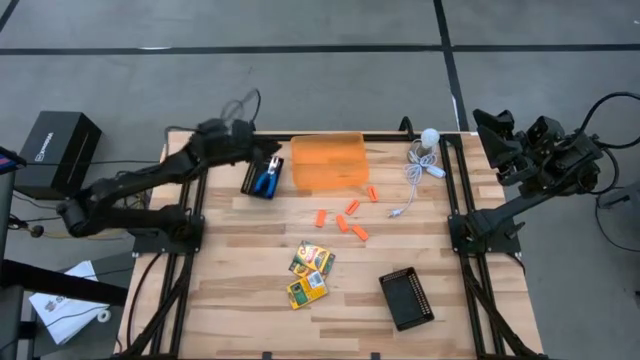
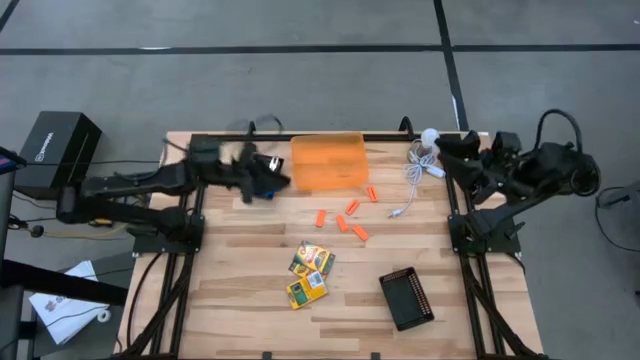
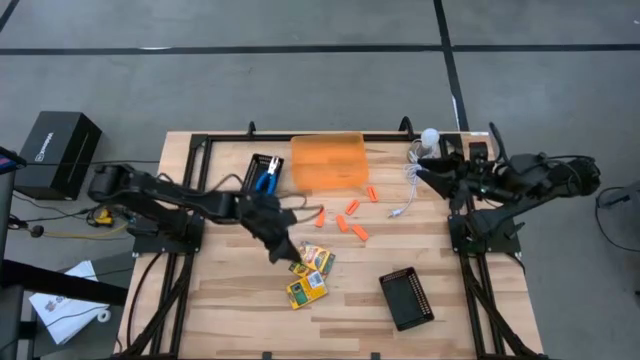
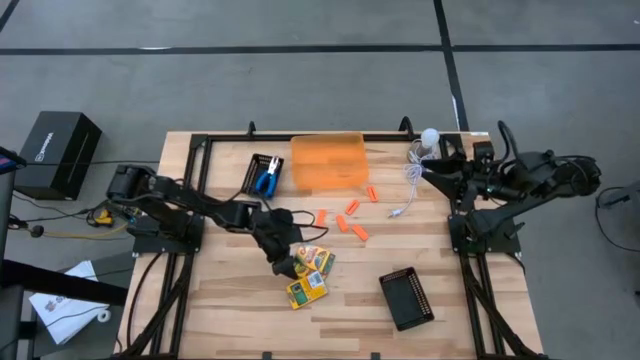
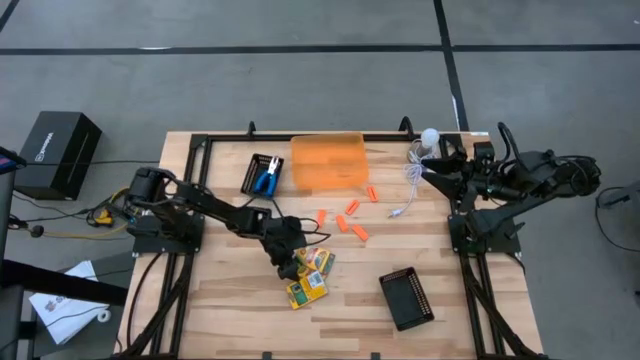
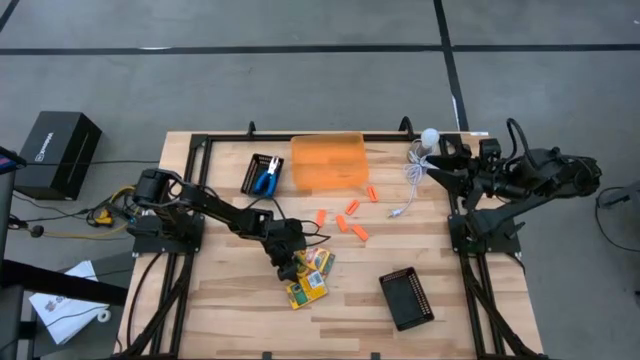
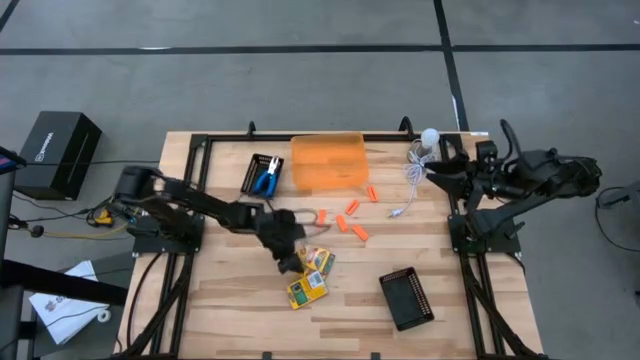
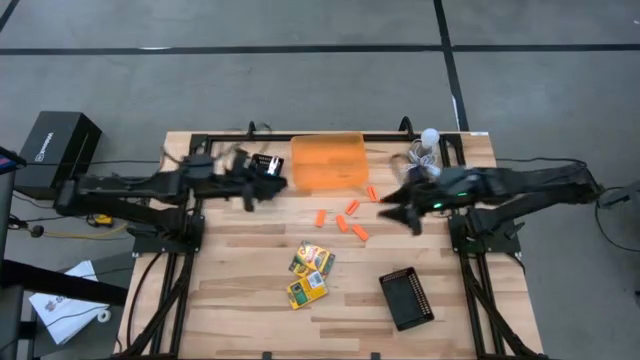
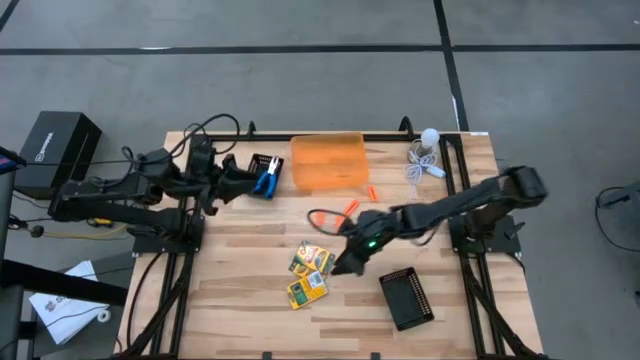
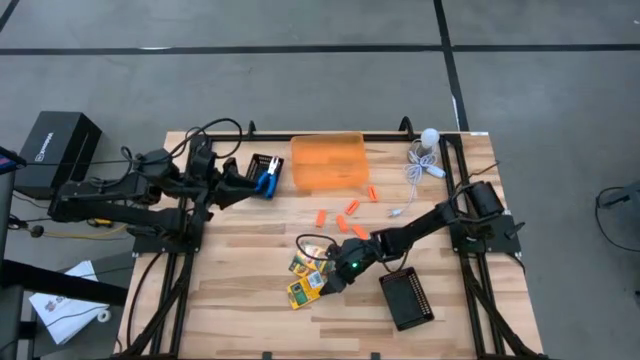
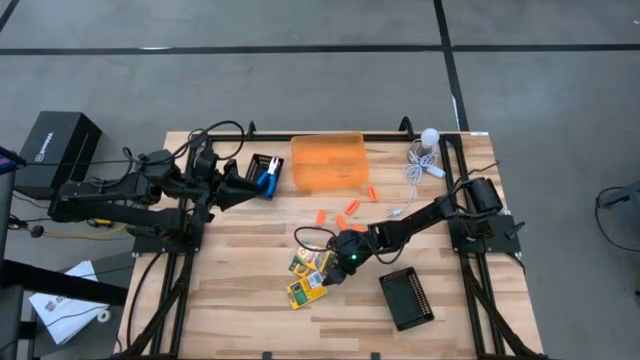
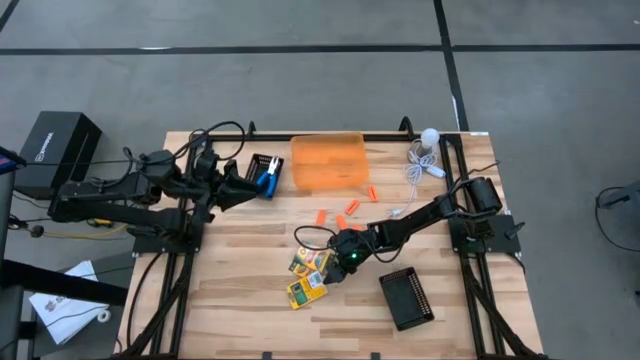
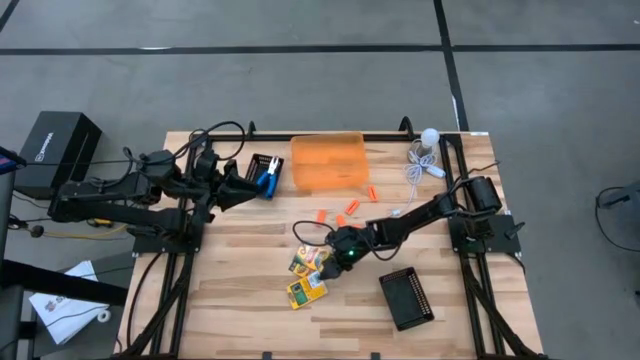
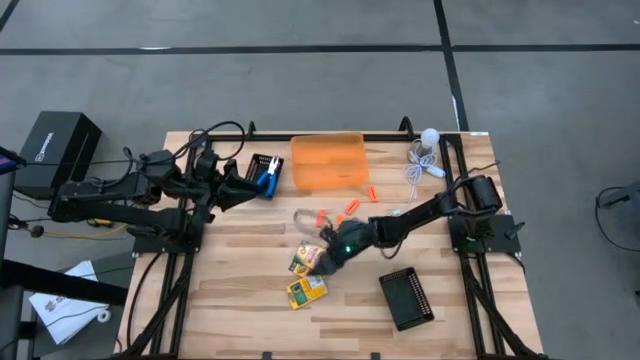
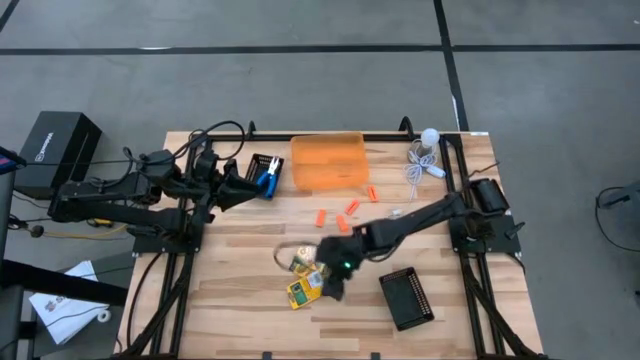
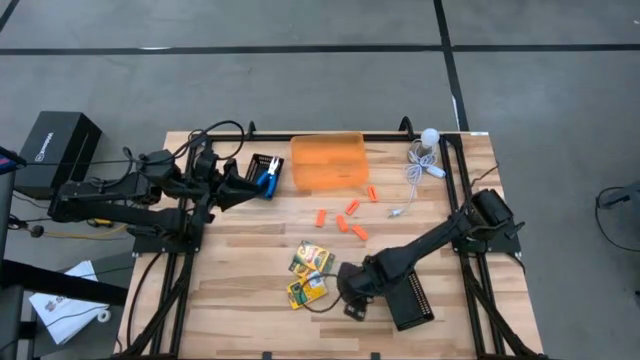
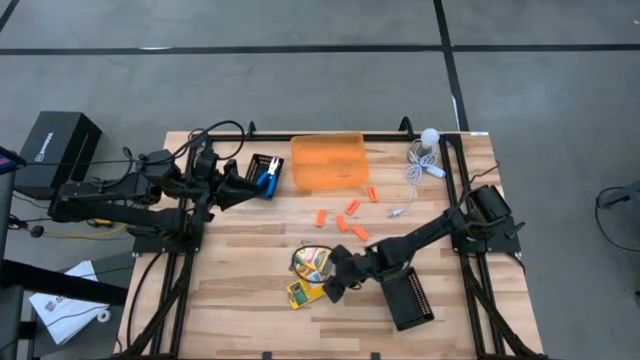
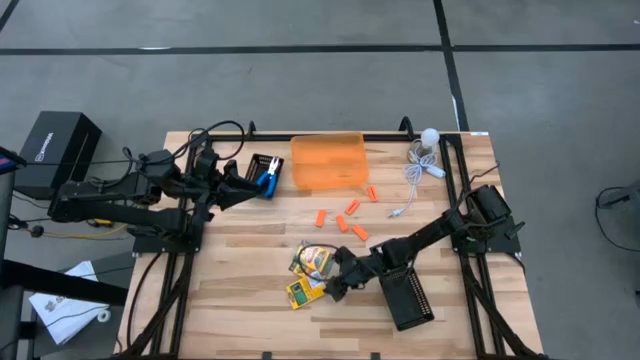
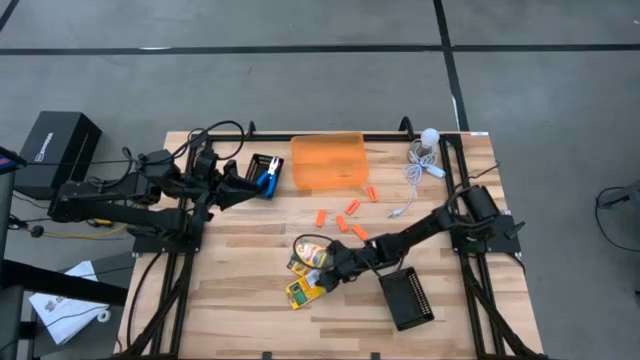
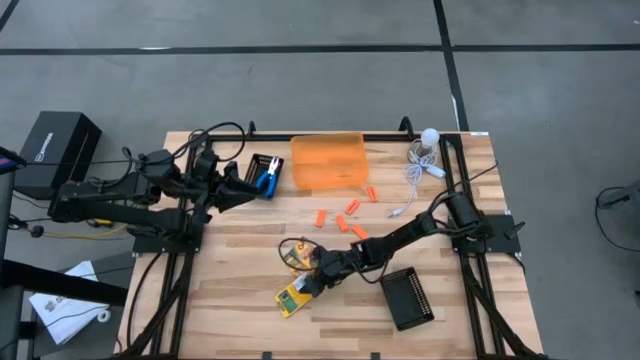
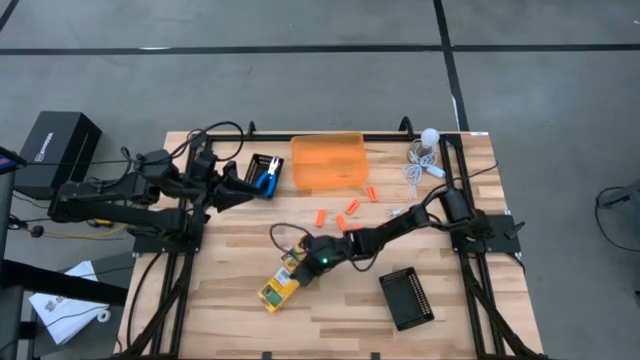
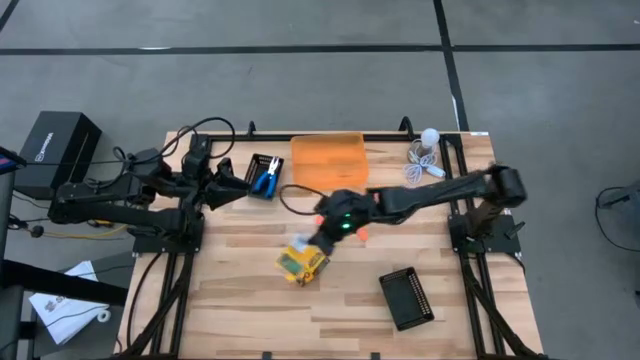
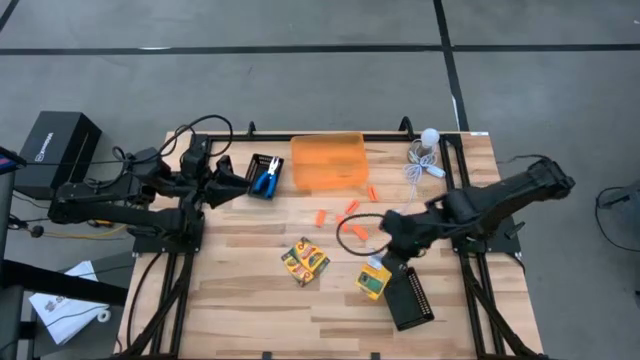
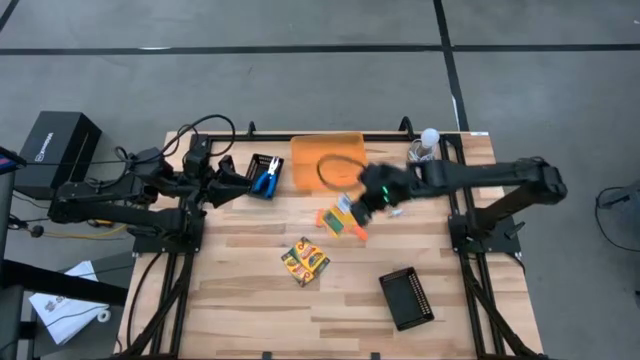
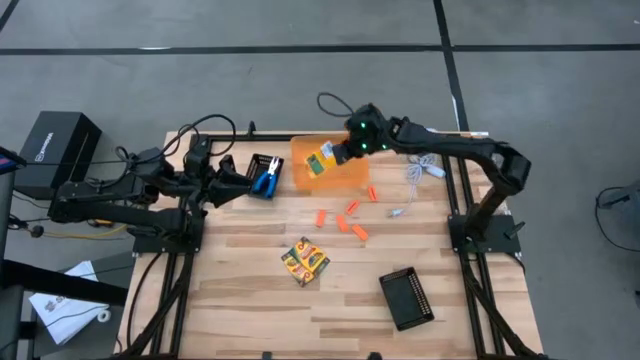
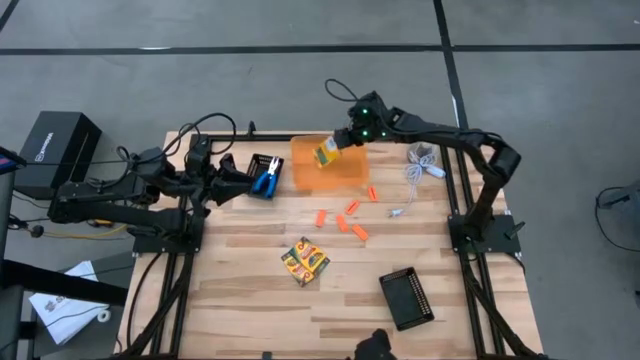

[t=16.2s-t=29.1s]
Task: Pick & Place School Supplies
Put the yellow crayon box into the orange bin

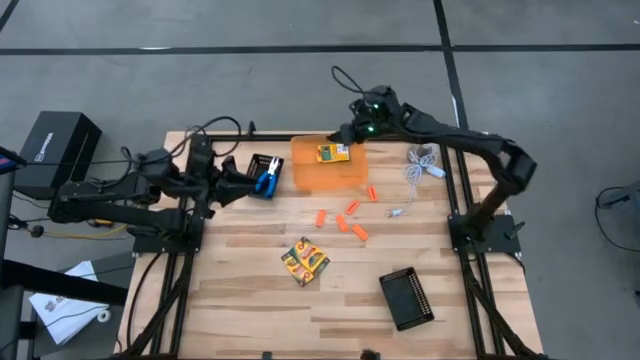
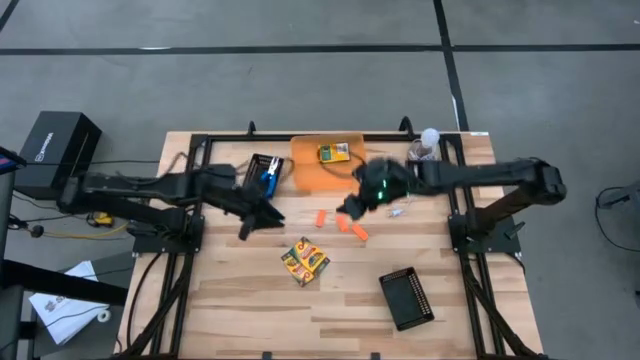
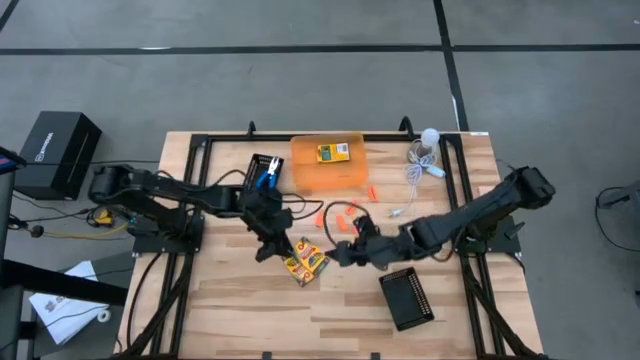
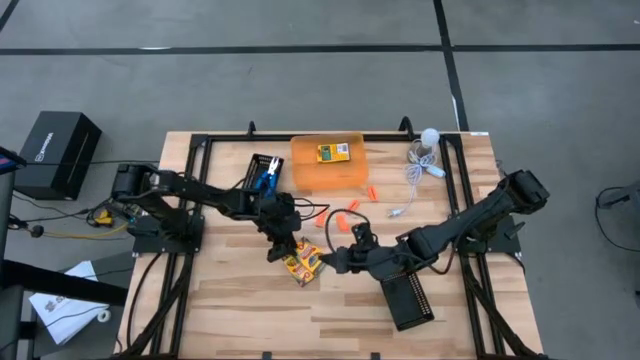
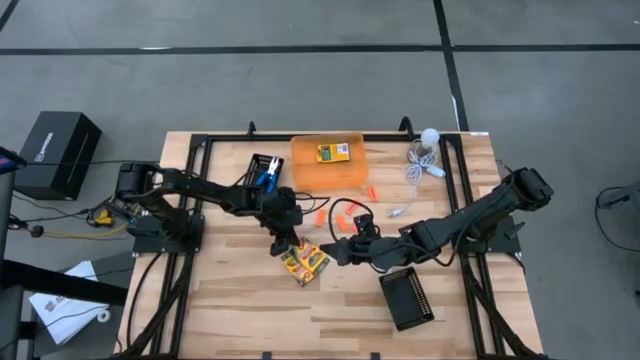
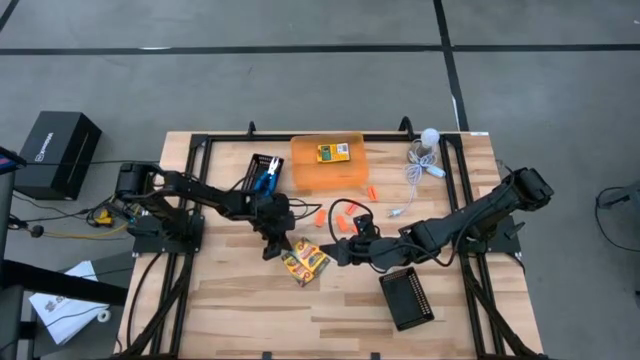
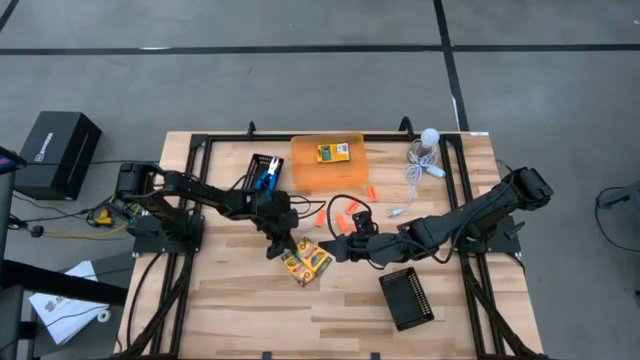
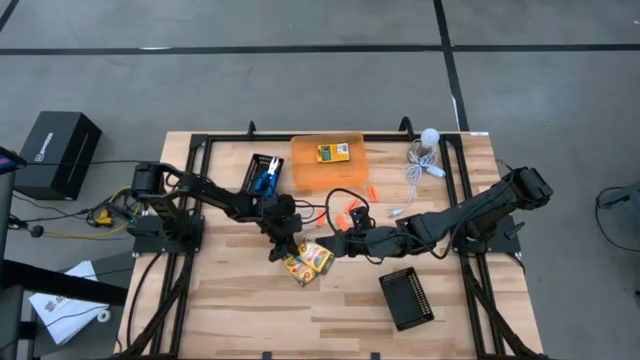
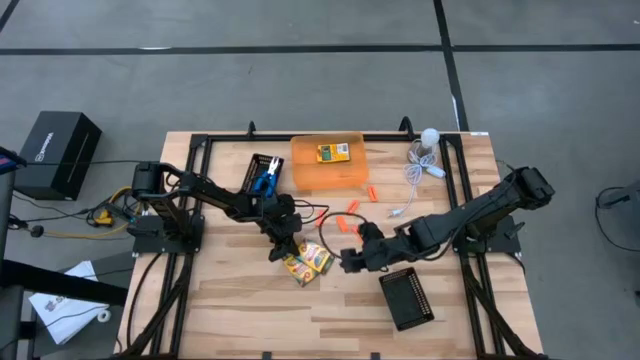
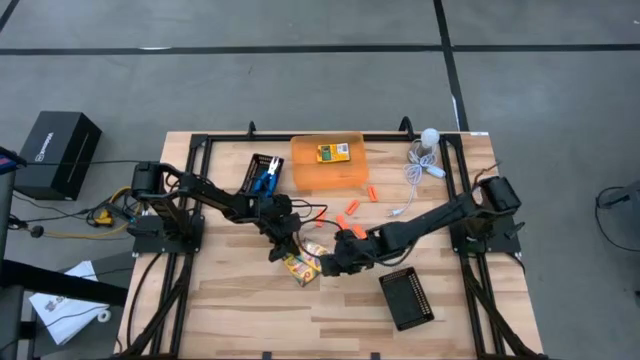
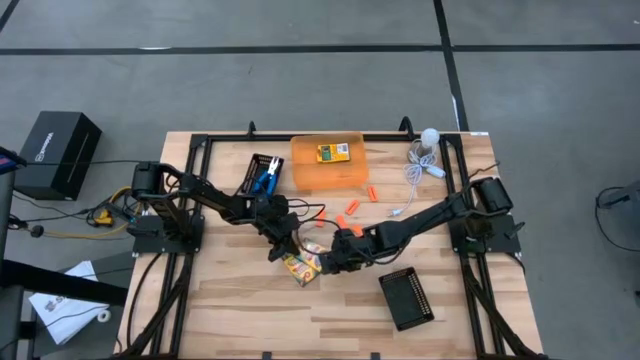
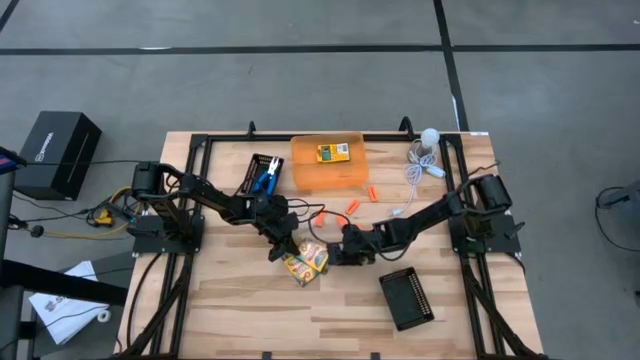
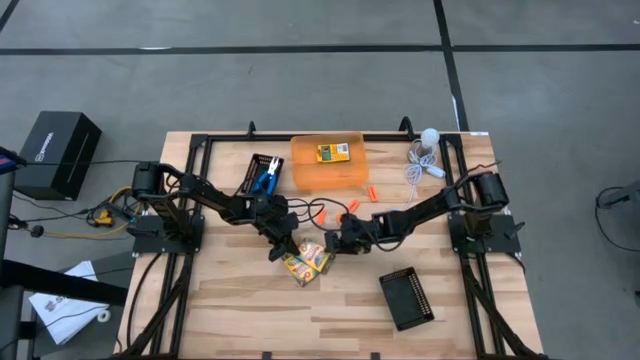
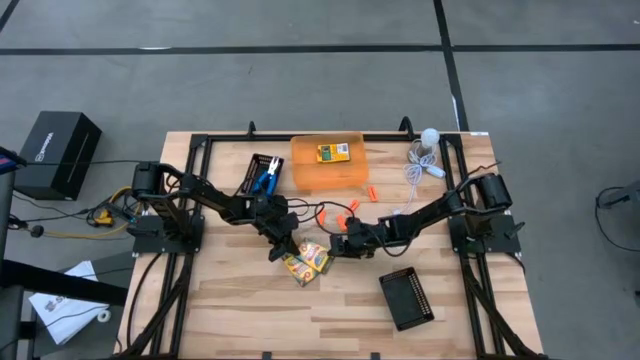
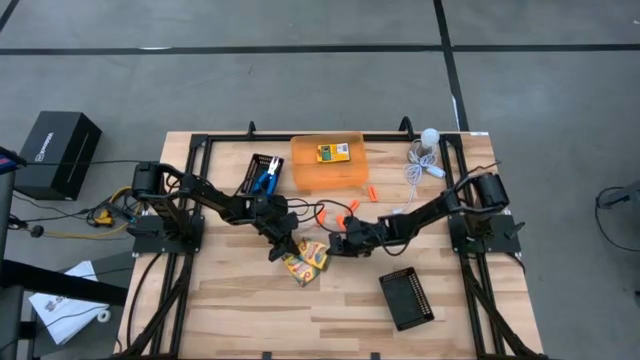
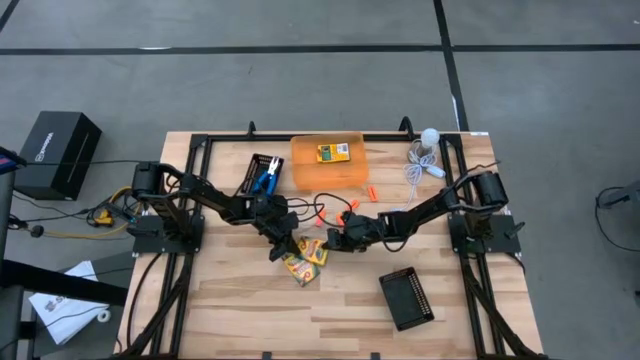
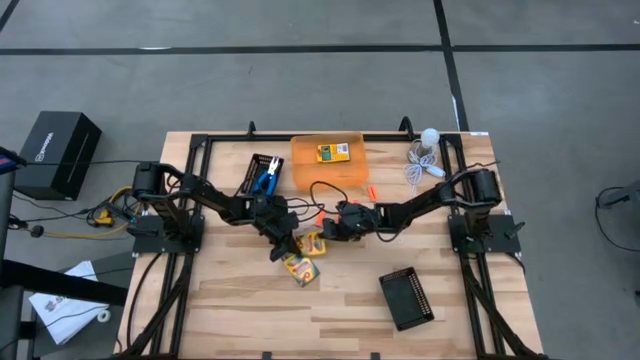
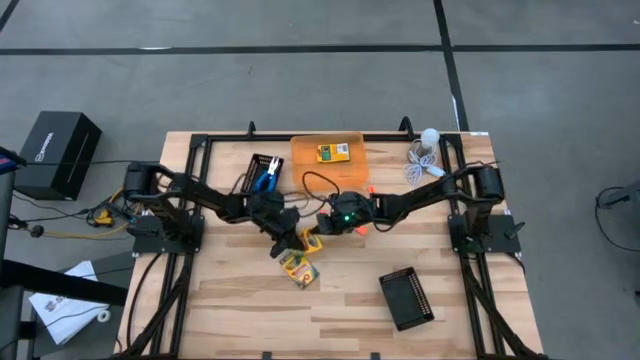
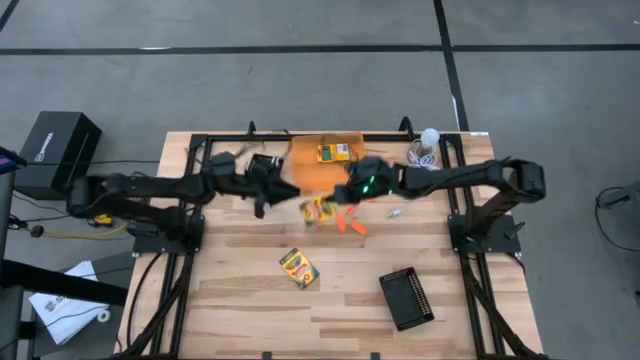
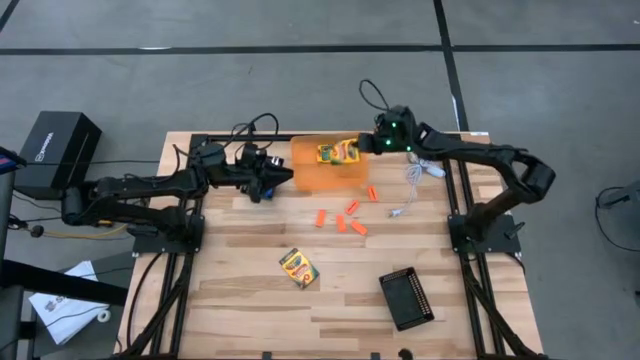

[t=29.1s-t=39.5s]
Put the yellow crayon box into the orange bin
